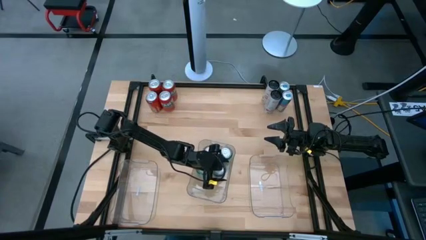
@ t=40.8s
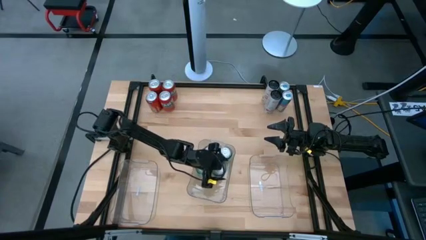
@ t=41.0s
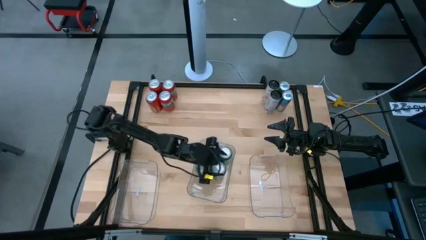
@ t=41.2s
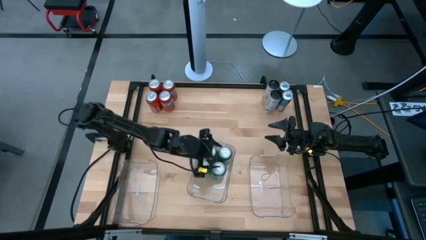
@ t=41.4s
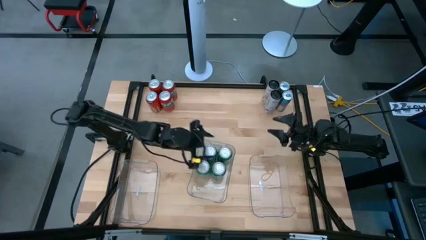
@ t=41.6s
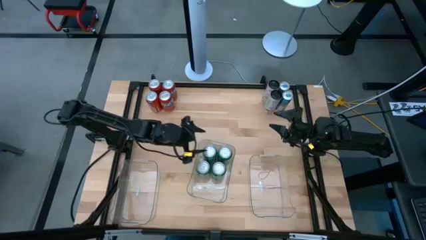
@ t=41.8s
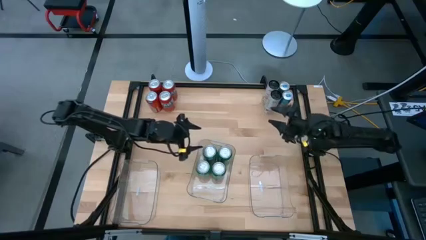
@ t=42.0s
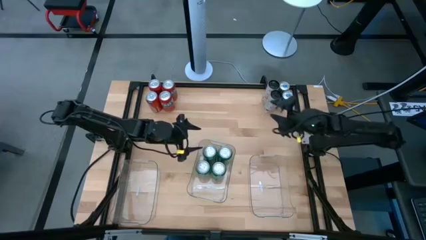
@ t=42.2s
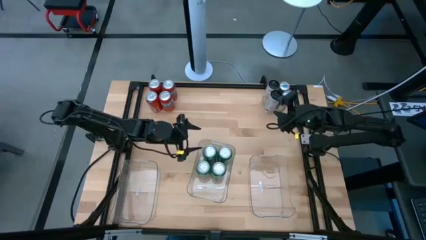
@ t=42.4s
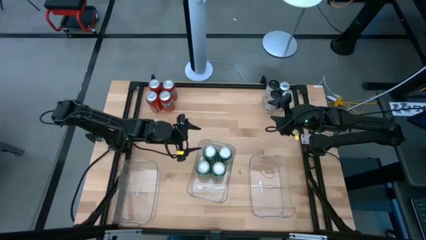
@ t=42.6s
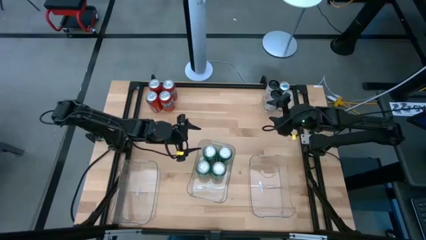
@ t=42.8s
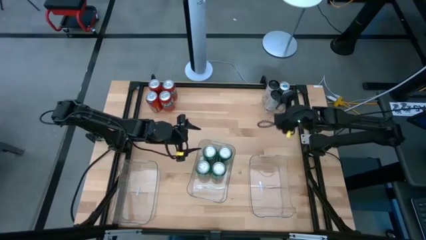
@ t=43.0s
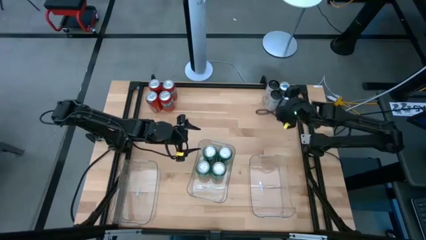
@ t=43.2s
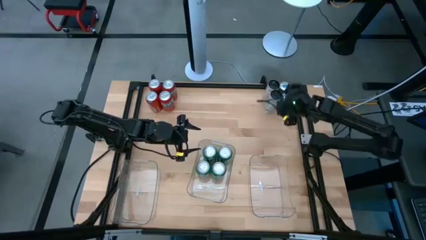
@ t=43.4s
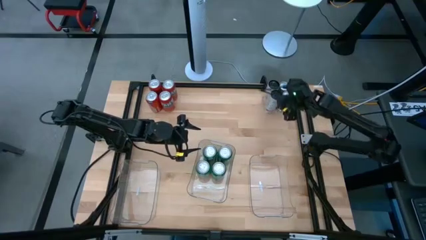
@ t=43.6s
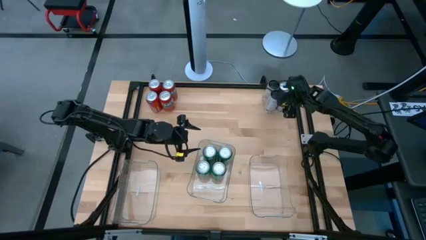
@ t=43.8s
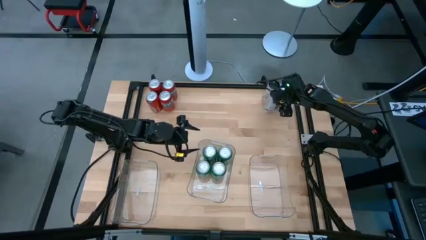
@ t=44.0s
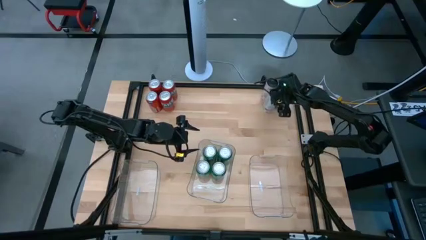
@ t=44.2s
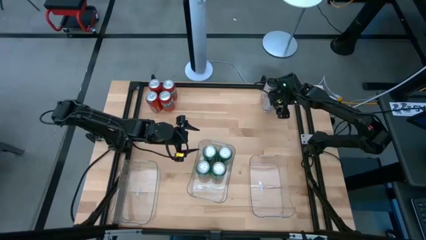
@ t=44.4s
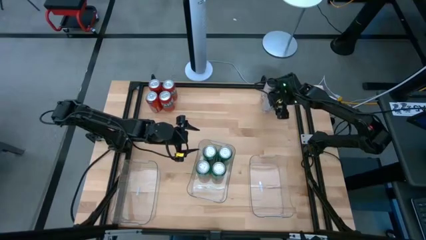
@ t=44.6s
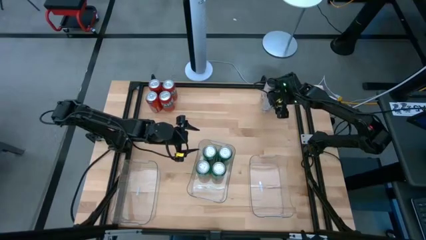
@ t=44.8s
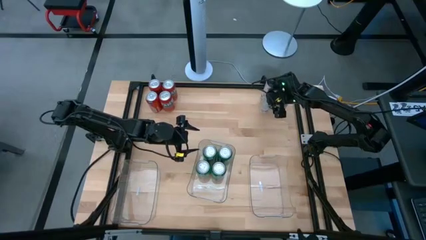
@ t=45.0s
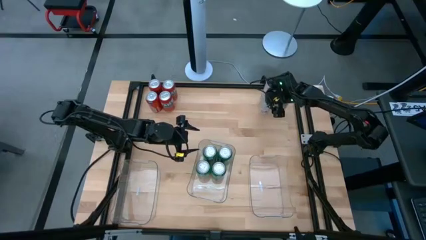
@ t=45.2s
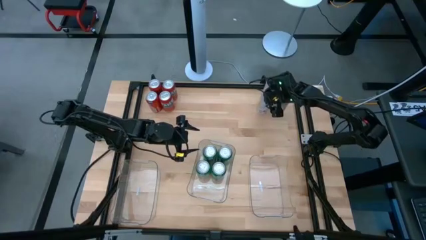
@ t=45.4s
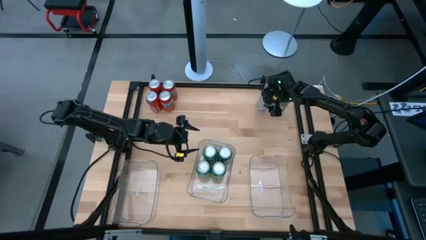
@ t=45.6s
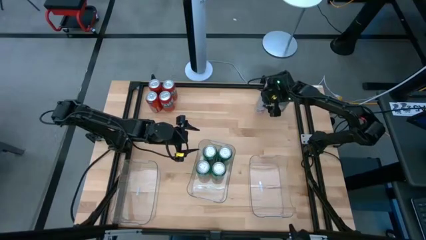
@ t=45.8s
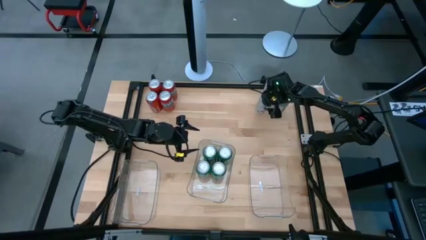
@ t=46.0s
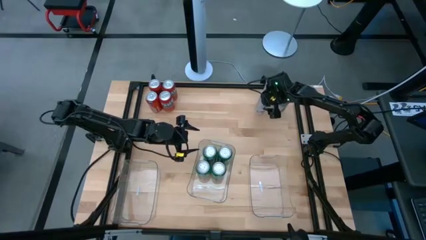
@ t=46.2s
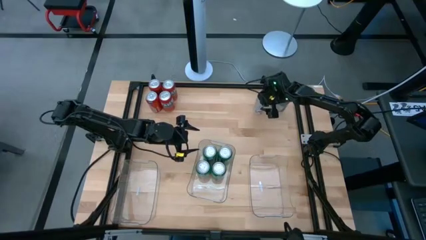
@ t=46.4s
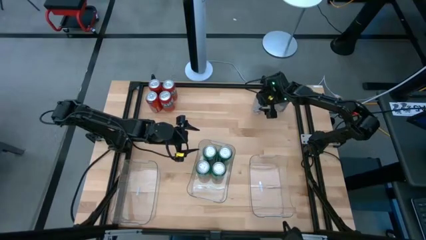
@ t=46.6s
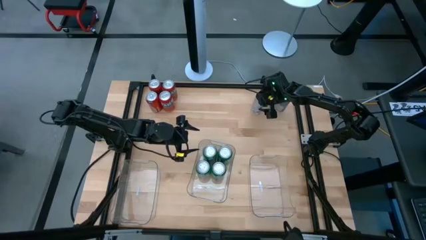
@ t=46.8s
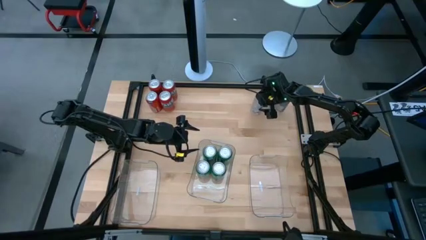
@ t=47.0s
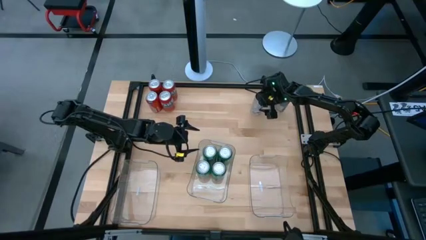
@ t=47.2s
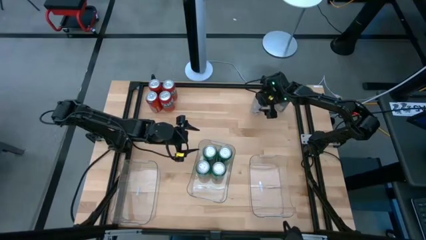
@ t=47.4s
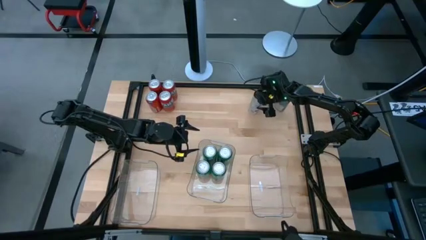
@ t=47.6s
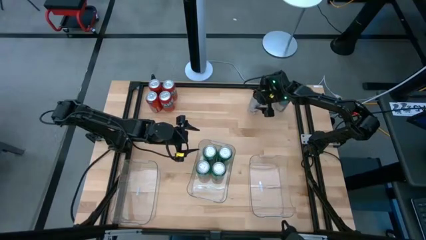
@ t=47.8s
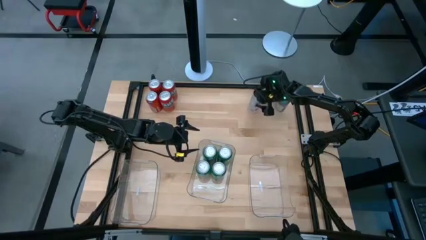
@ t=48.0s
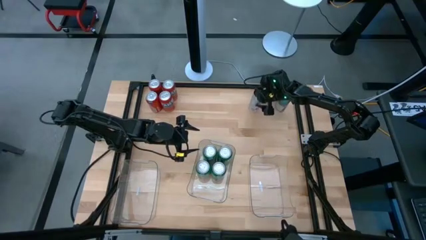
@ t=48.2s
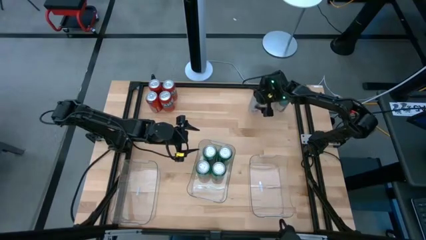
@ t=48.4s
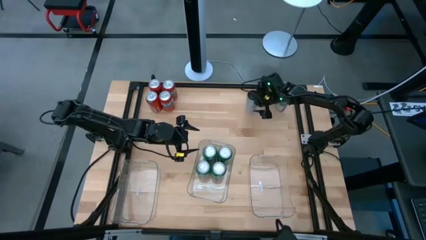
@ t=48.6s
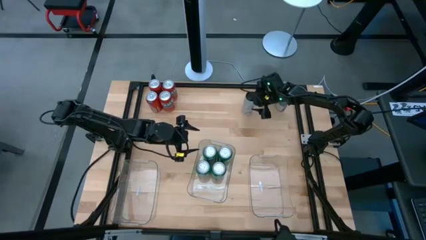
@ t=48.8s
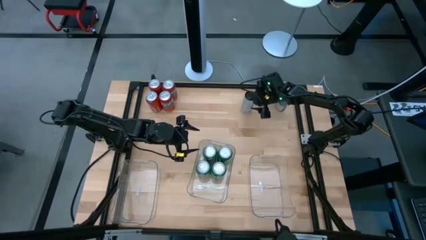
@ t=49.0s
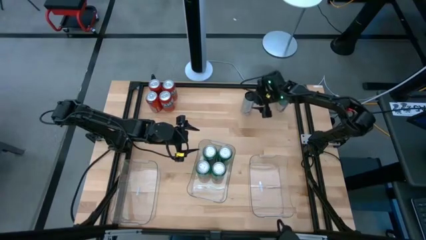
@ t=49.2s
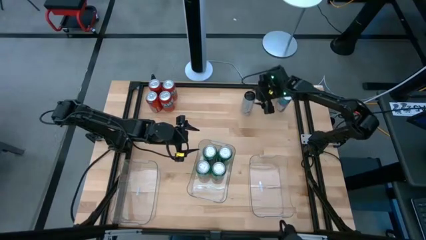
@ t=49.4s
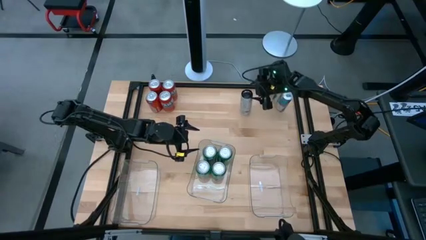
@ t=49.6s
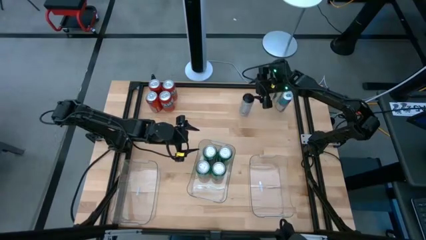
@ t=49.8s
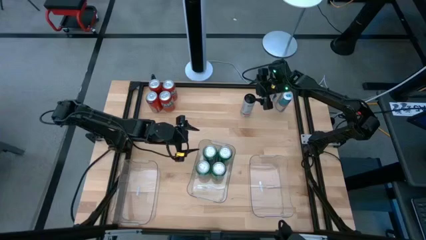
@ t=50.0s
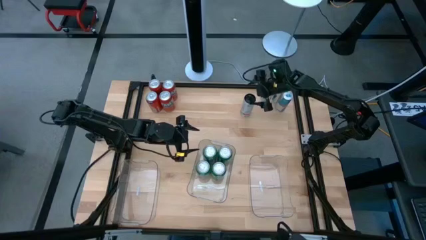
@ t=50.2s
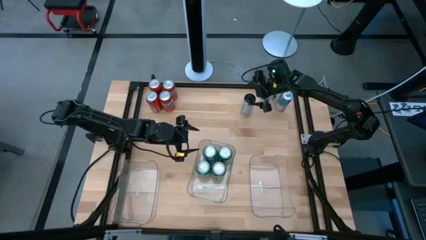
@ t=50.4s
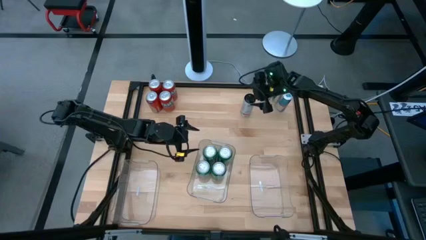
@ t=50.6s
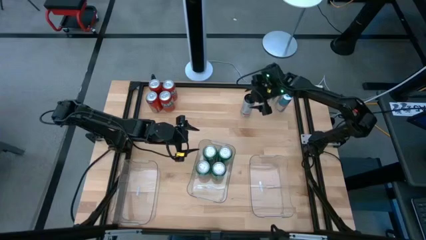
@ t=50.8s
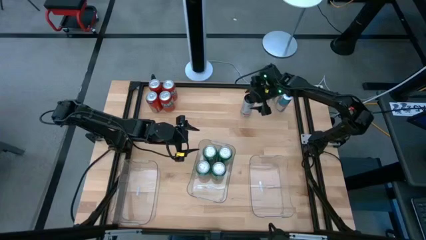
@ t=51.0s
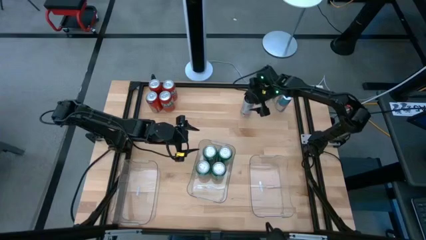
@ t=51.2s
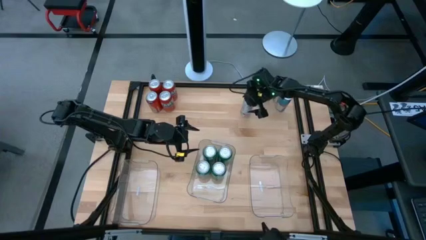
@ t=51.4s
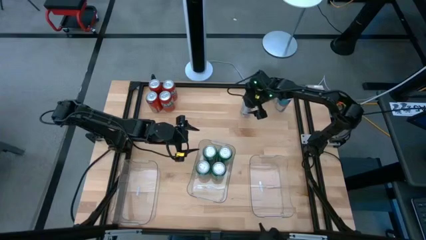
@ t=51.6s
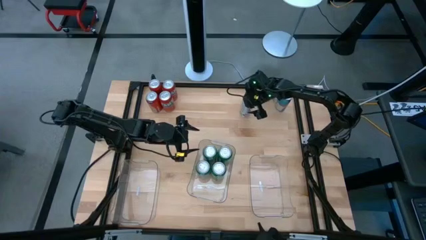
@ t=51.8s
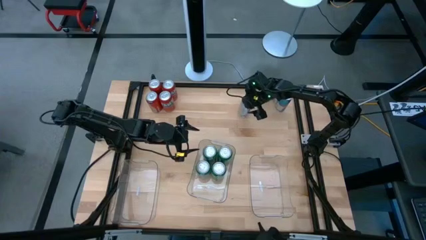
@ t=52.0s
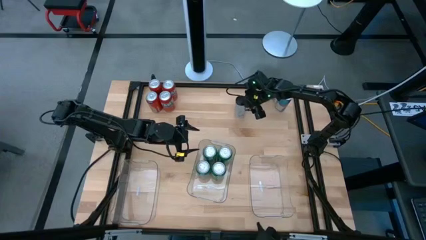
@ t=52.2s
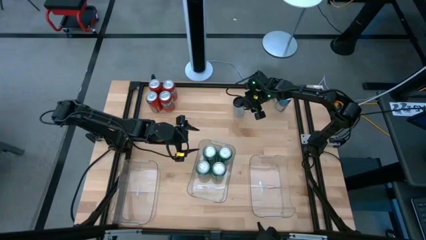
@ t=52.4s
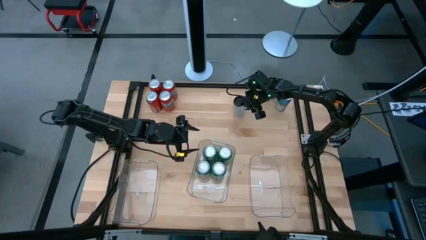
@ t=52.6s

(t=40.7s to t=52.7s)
Task: Sort soda cans
Put the white-pink soda can into the right transparent bin

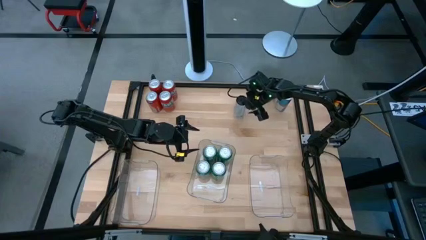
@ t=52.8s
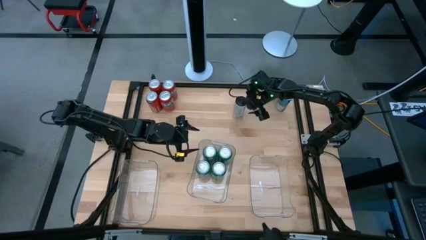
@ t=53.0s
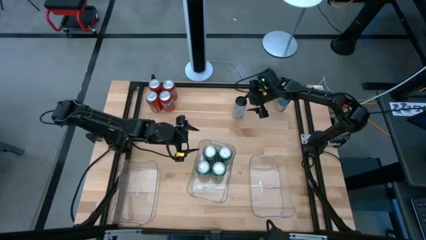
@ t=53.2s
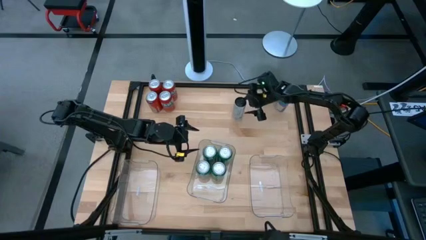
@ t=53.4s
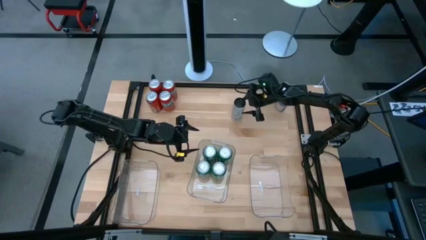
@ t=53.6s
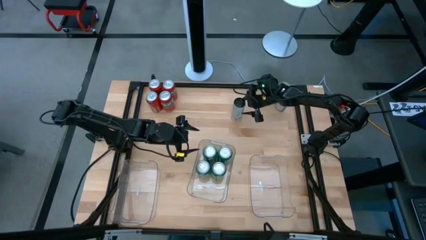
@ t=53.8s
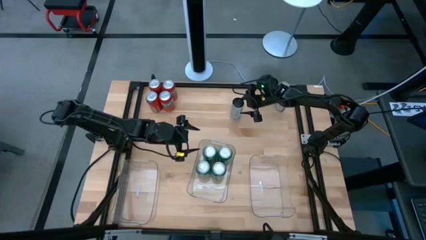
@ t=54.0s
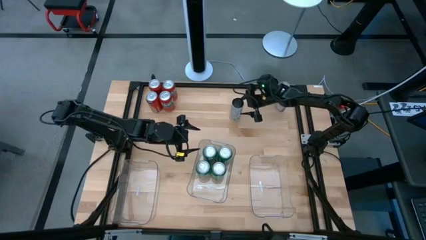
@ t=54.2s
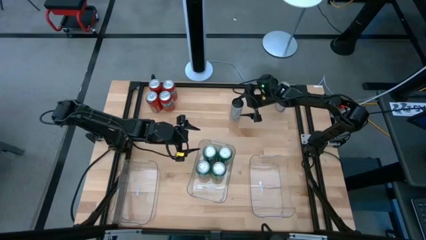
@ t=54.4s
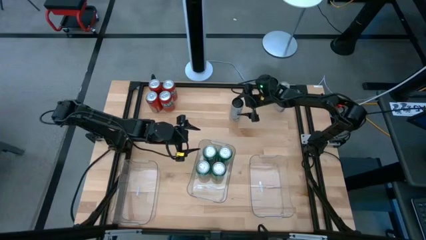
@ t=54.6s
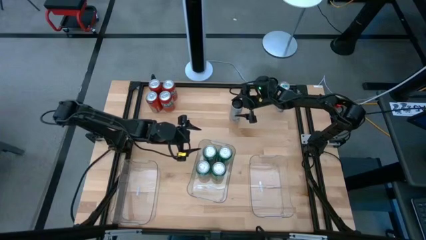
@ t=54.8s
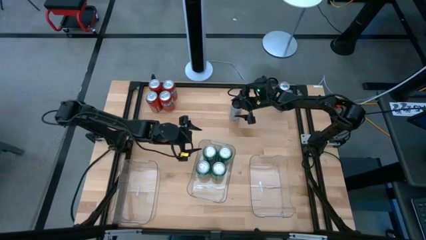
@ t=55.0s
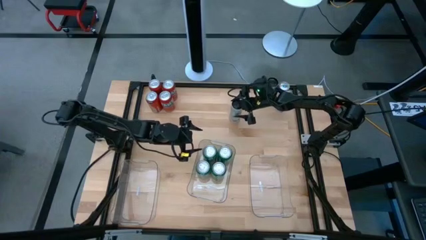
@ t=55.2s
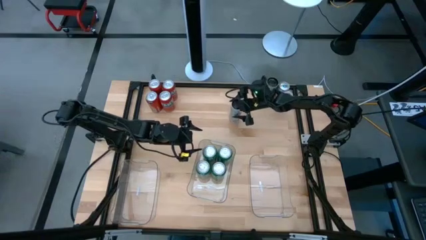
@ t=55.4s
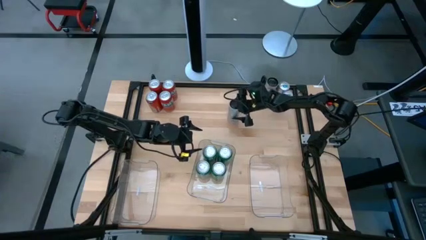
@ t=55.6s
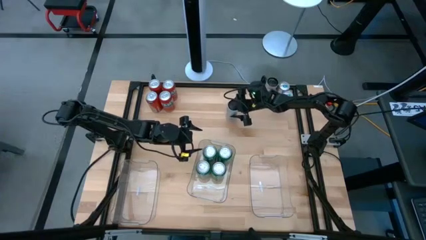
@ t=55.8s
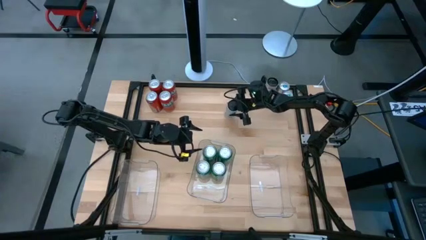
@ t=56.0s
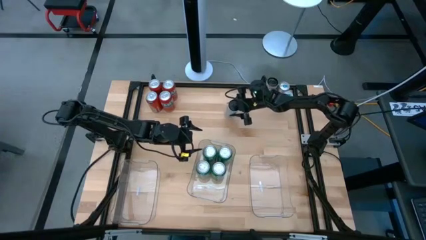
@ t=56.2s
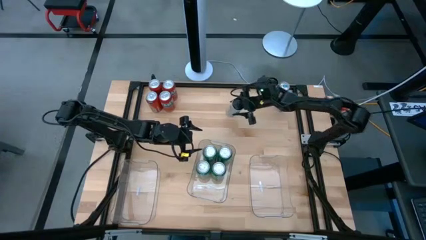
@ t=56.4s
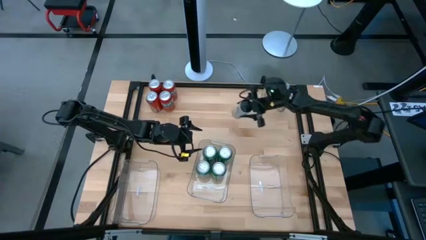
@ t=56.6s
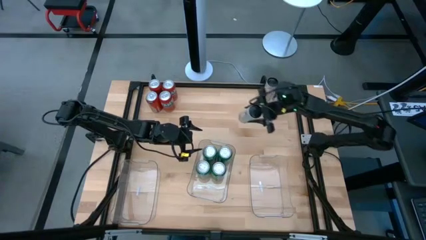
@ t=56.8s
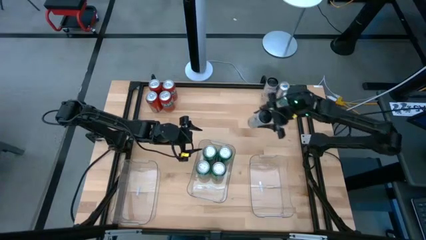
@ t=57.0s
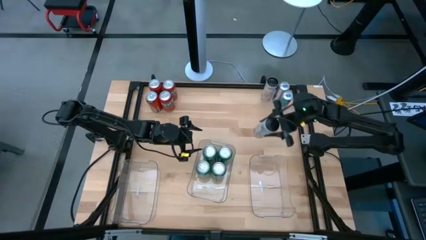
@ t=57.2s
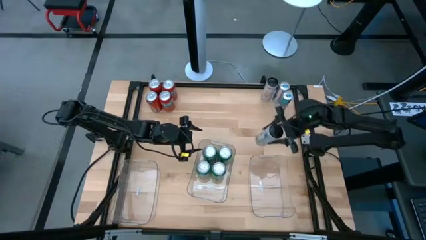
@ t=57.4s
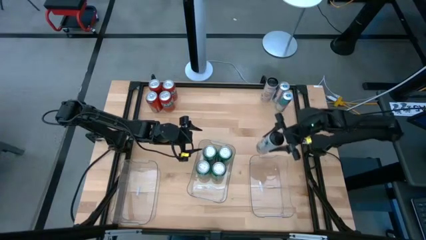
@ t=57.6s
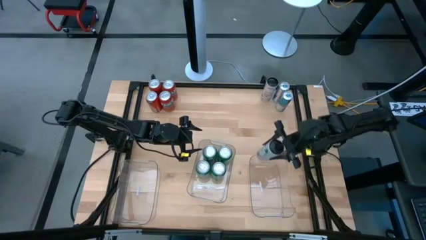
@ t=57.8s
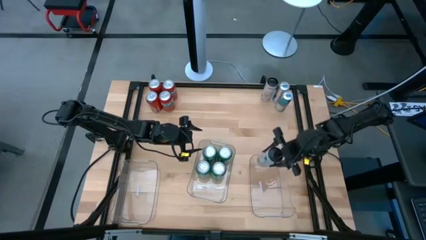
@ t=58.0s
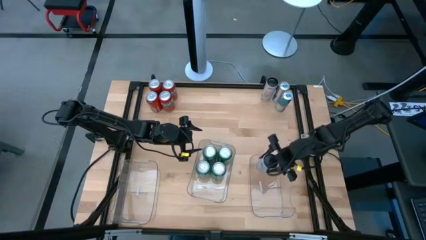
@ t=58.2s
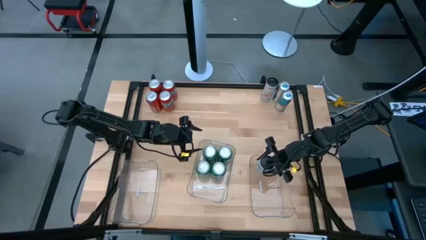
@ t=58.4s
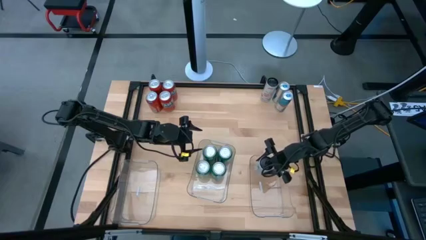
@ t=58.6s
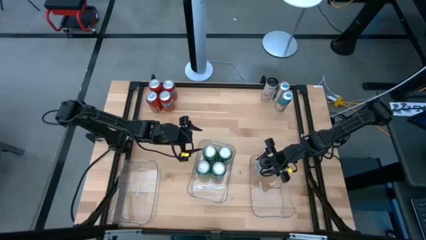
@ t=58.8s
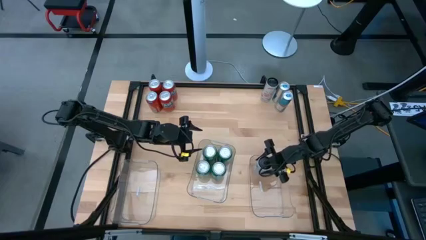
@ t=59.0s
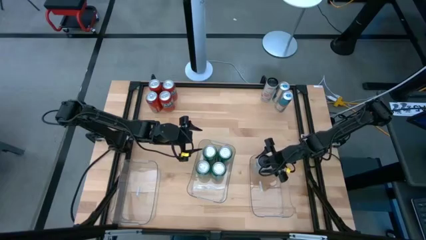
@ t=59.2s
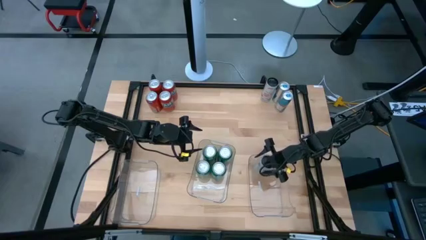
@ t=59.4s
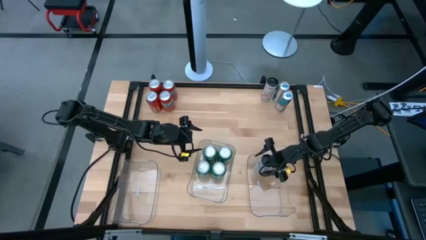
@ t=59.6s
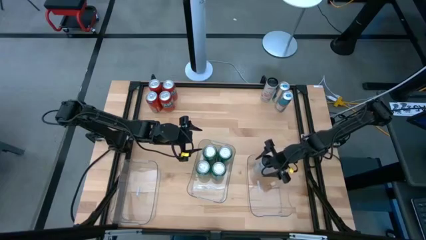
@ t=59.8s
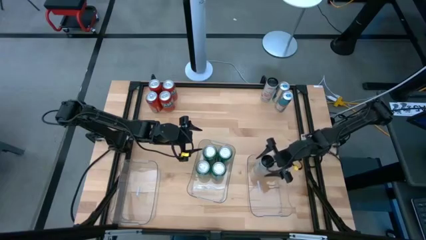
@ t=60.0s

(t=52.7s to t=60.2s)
Put the white-pink soda can into the right transparent bin
